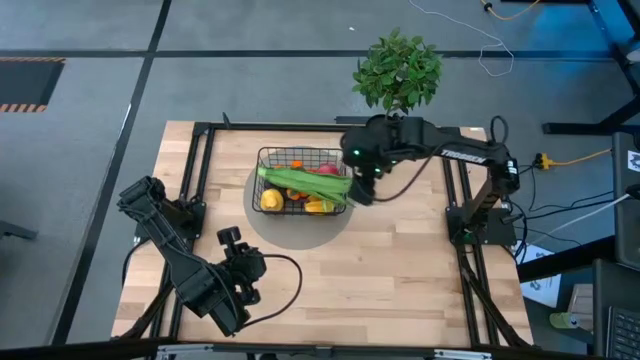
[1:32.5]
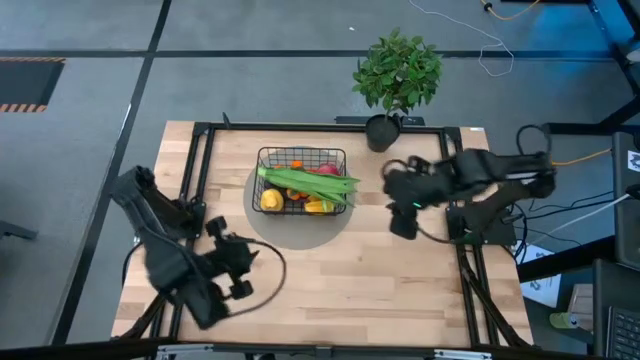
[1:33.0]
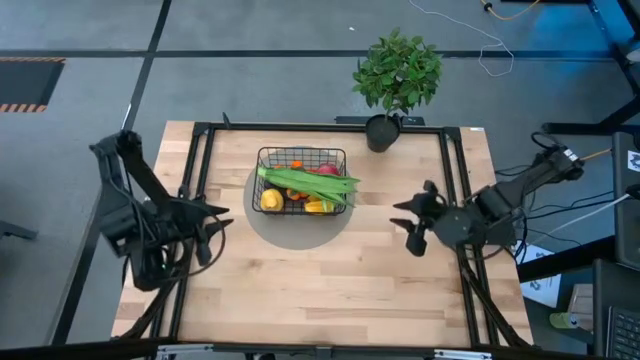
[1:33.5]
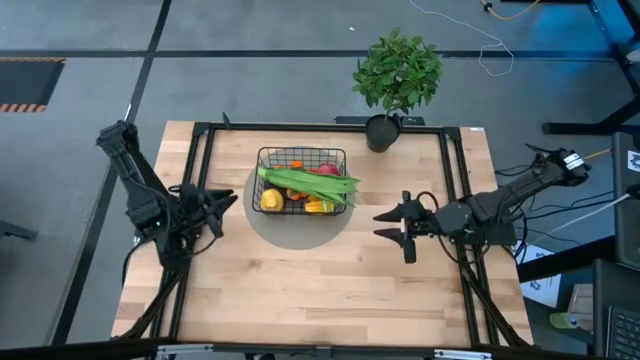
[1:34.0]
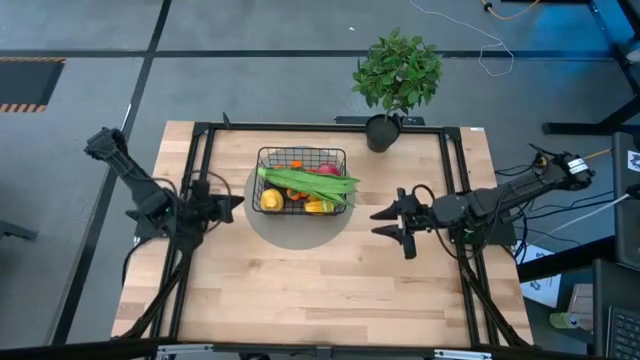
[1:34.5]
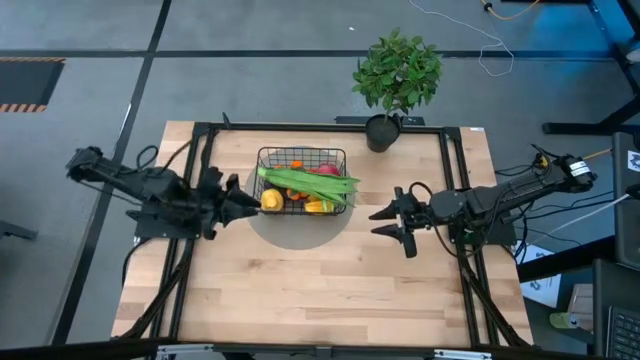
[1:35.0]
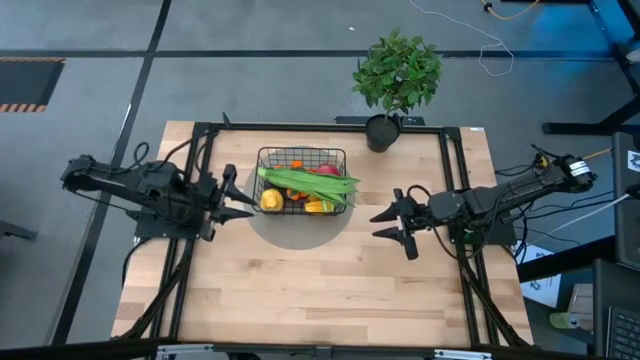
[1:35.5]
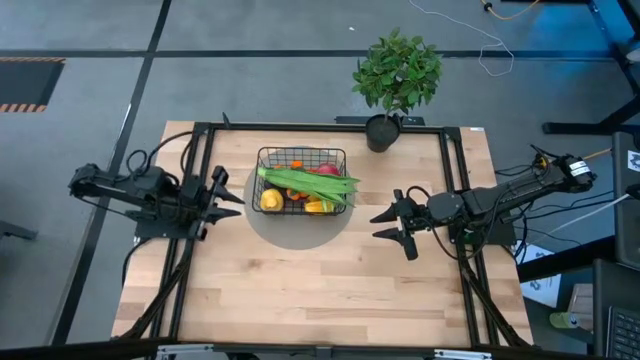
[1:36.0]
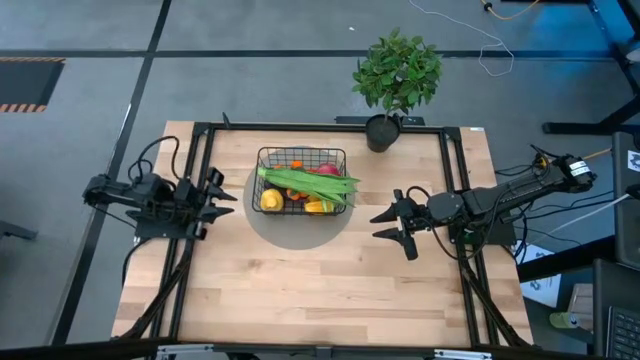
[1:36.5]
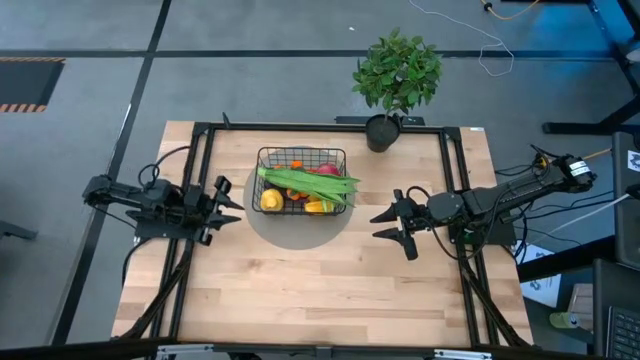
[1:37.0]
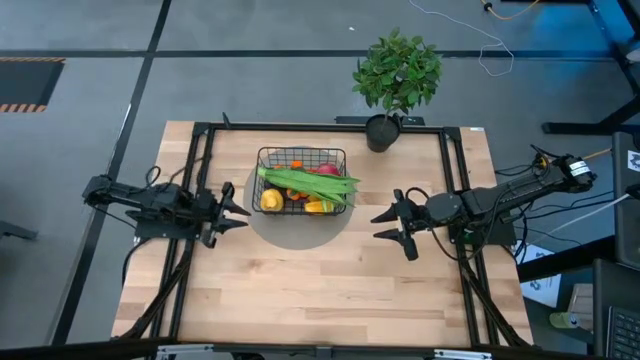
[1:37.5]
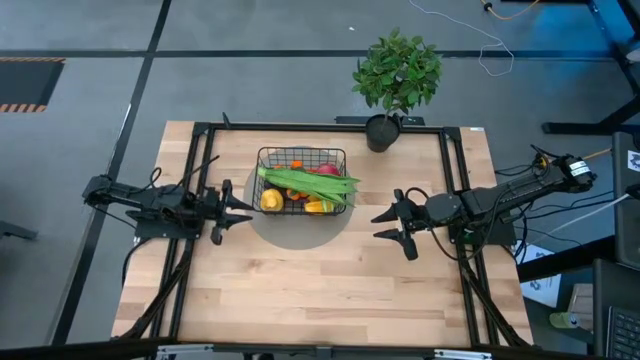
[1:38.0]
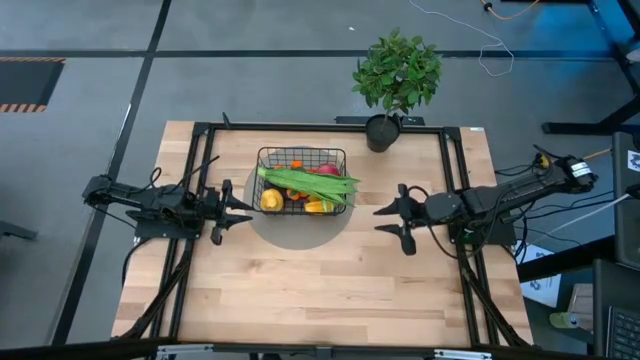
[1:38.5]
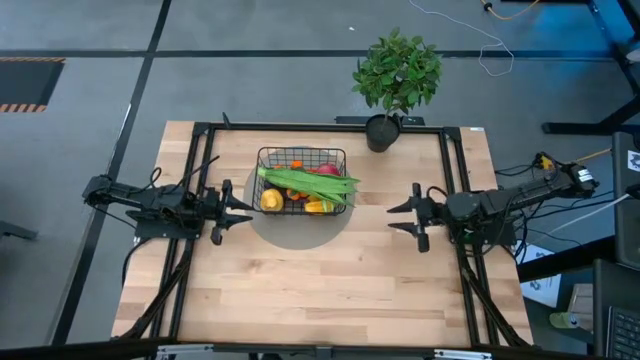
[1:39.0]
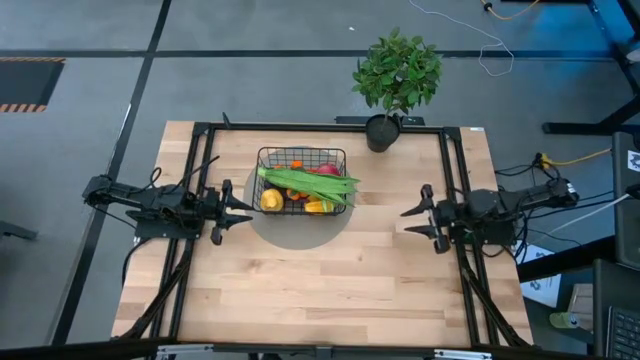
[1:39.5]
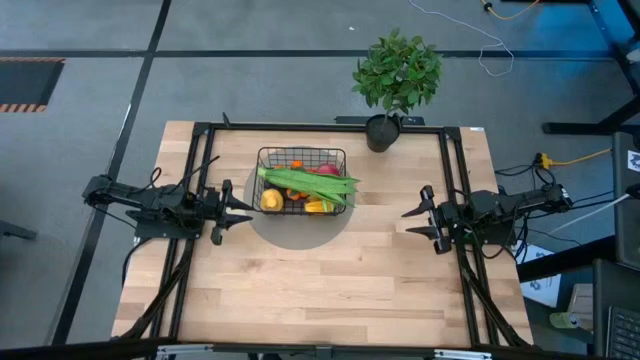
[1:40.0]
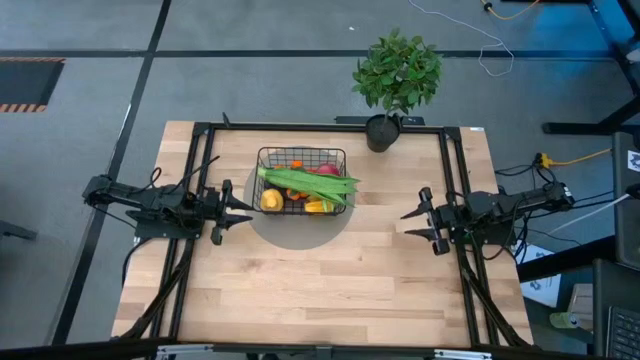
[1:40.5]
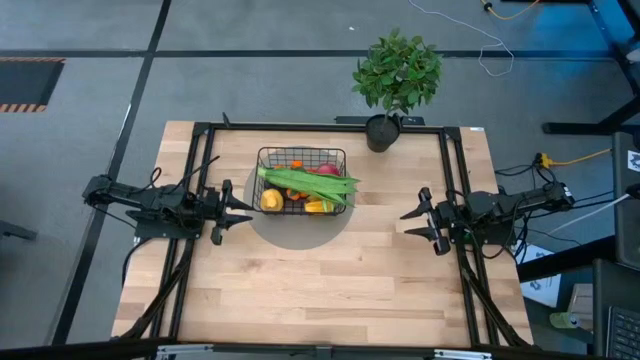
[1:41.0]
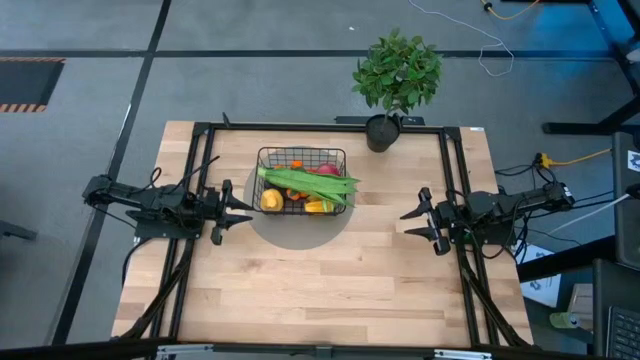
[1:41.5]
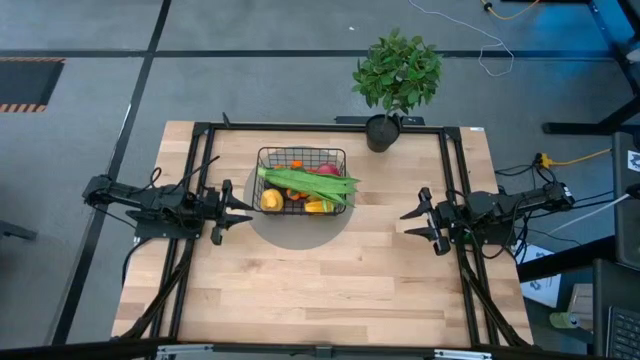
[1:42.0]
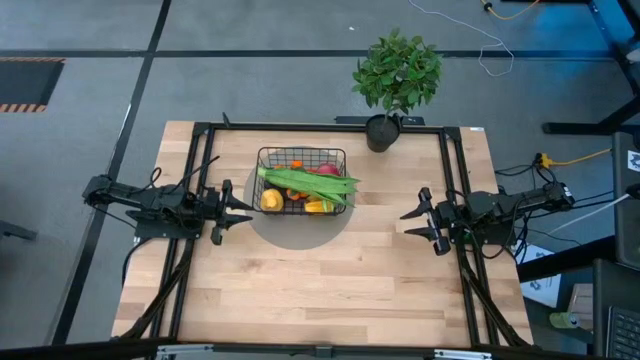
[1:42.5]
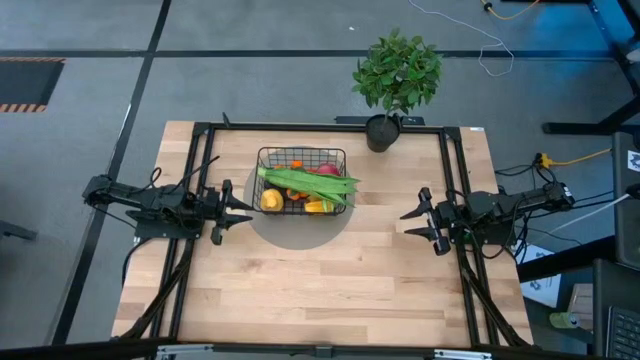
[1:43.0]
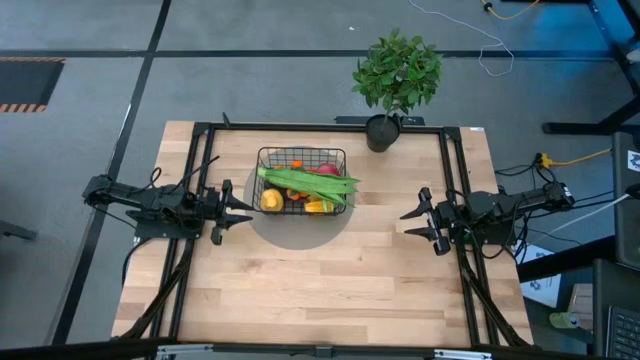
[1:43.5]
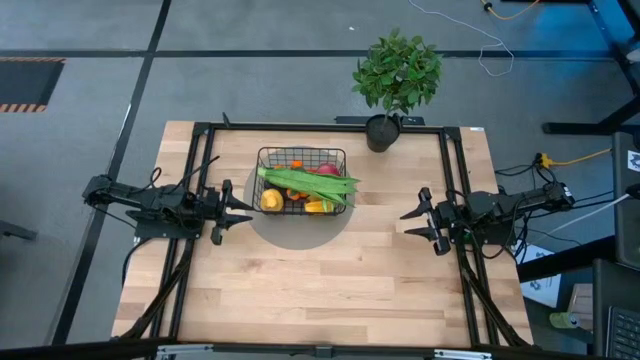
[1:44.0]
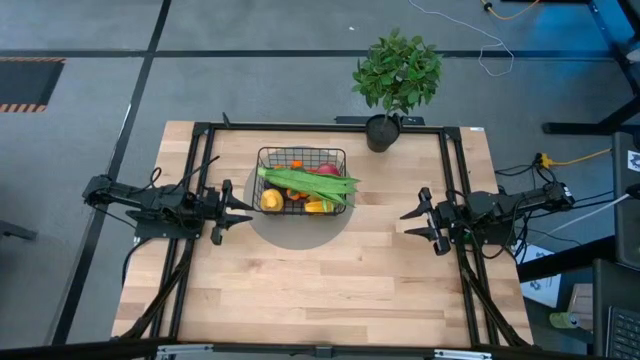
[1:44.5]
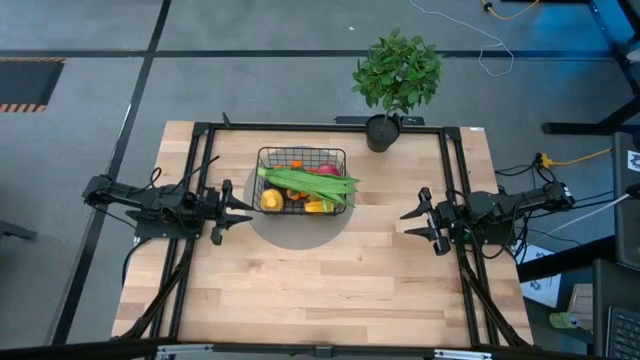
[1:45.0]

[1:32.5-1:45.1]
Task: Build produce basket
Return to Home Position

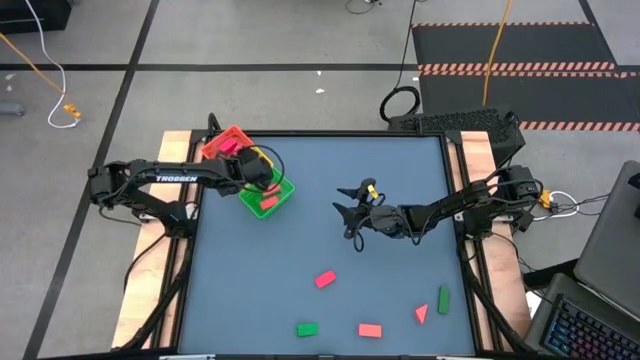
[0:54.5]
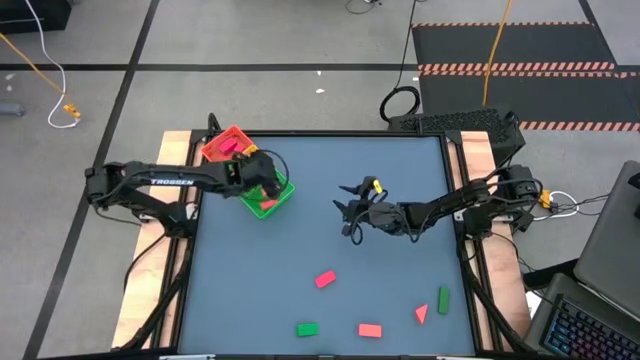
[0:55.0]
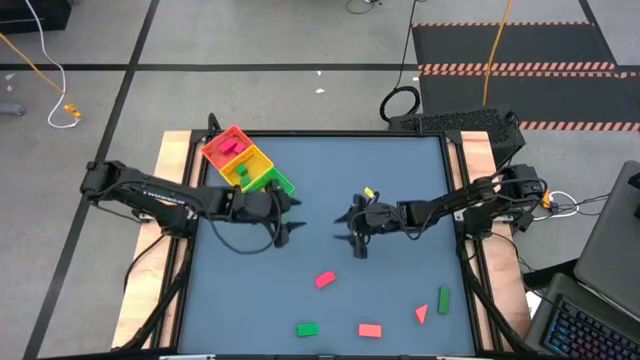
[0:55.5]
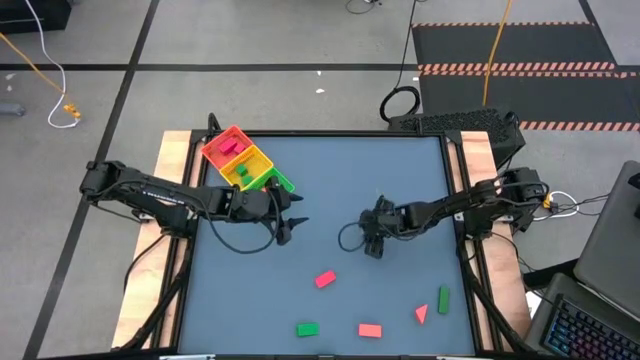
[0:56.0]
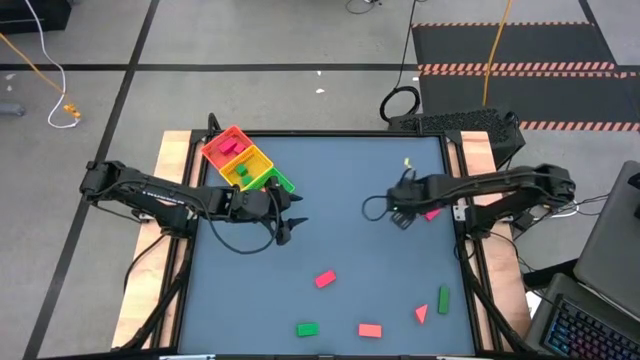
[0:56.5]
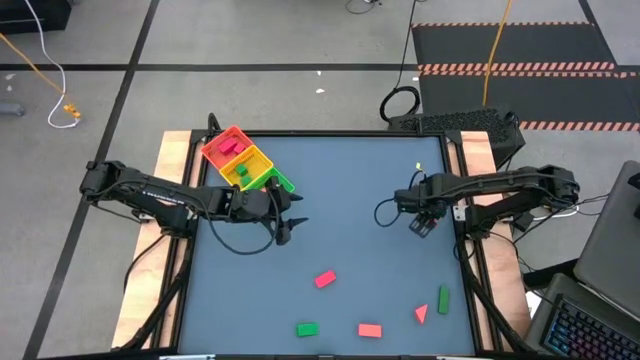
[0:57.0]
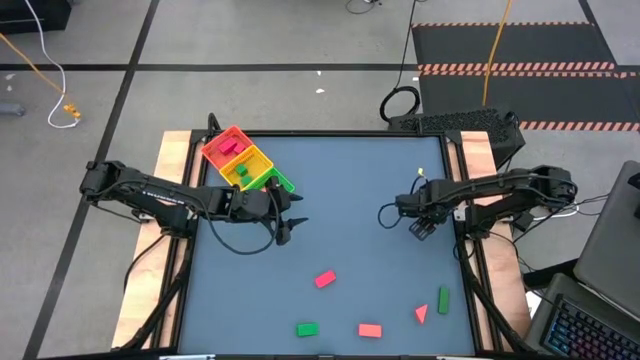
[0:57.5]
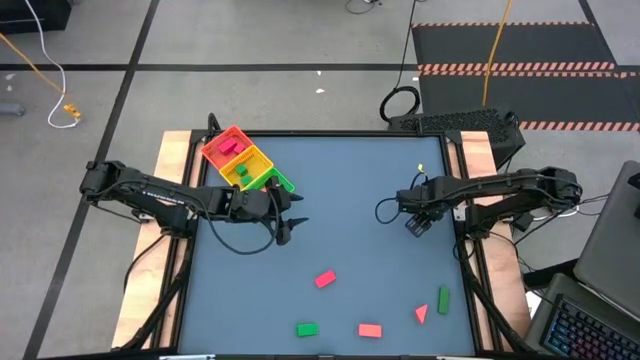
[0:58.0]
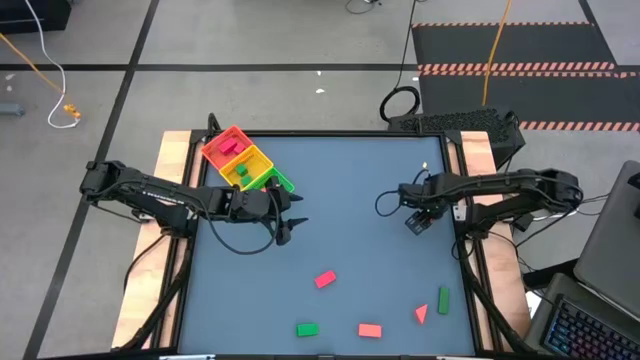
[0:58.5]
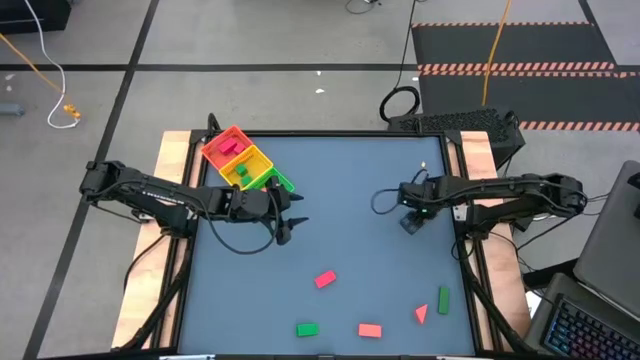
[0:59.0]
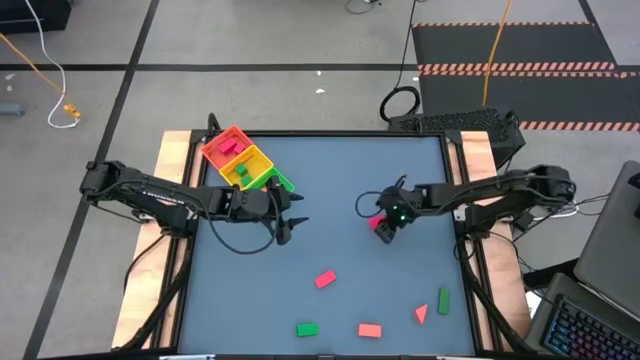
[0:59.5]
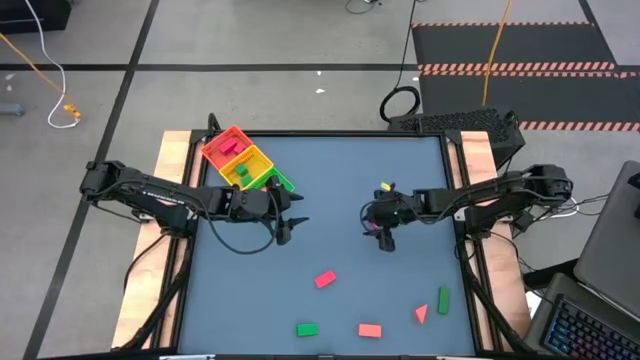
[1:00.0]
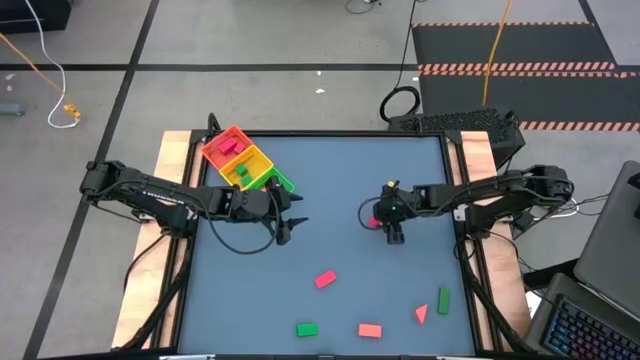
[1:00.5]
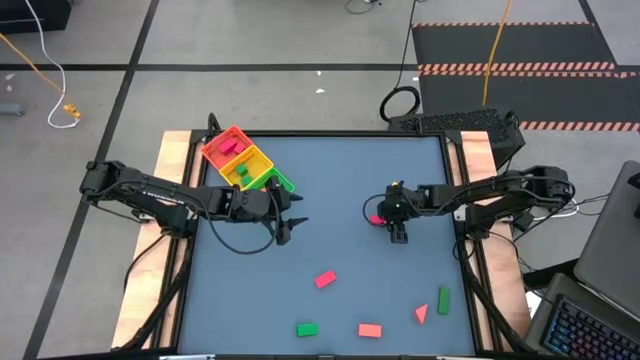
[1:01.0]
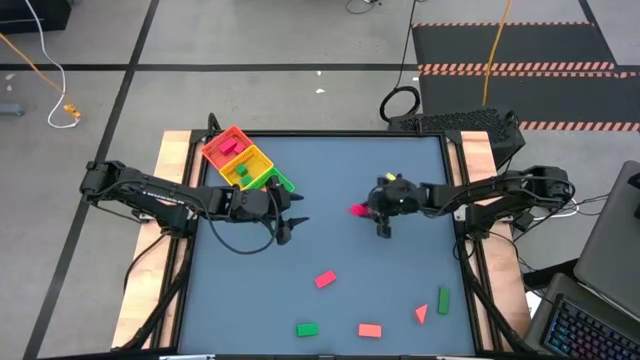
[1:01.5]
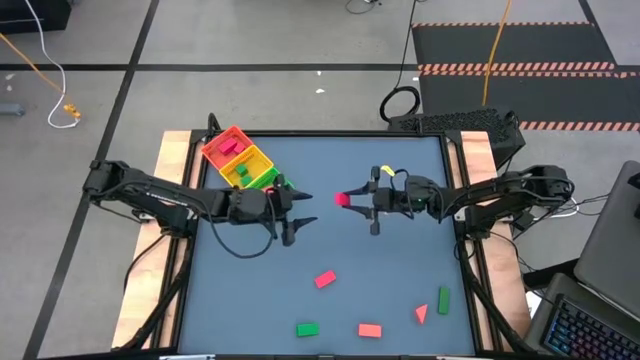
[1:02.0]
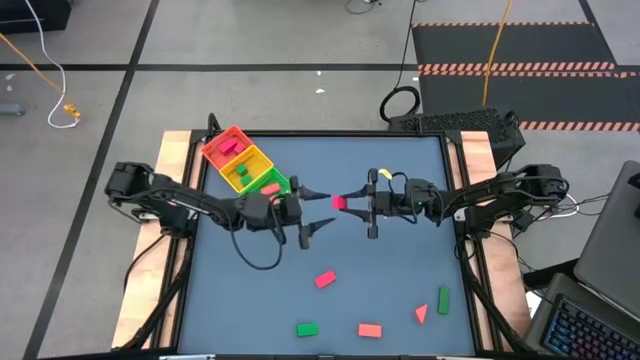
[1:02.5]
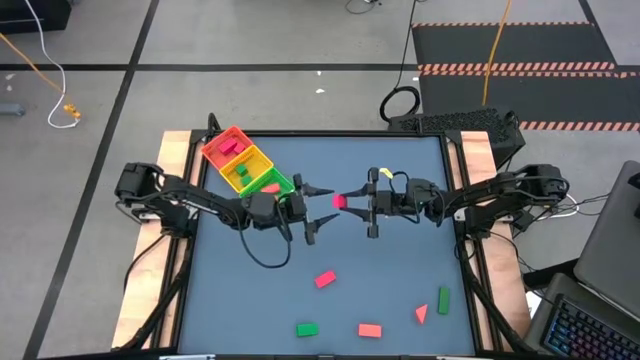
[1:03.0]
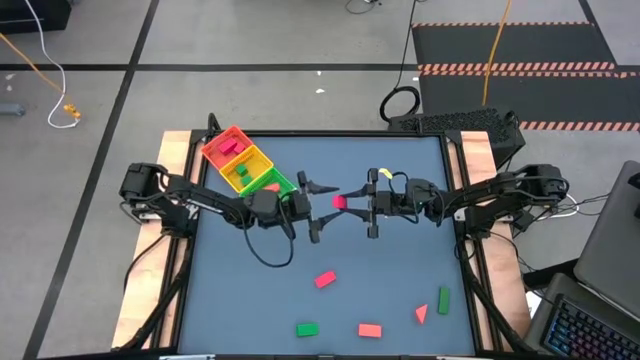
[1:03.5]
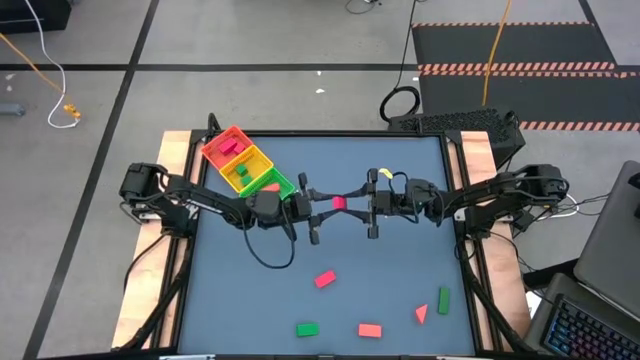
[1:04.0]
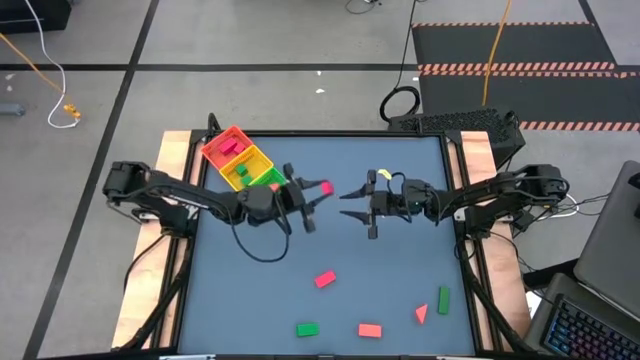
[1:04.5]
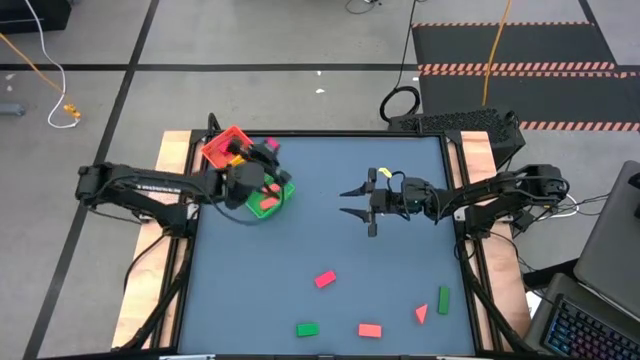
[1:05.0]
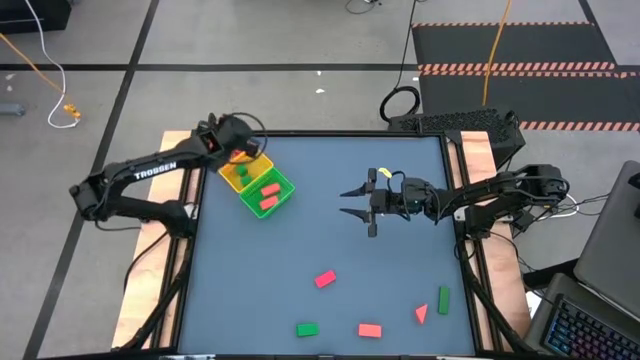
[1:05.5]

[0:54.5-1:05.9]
Task: Sort & place blocks by color
Put the red block into the orange basket
